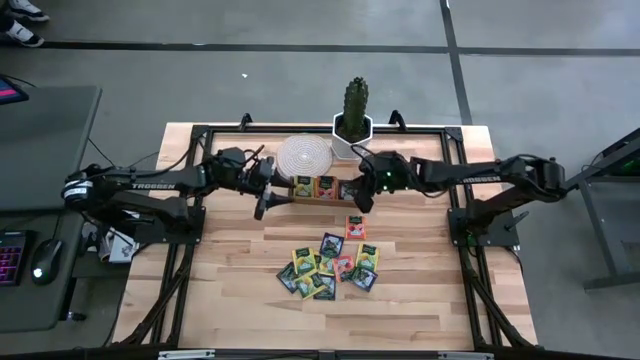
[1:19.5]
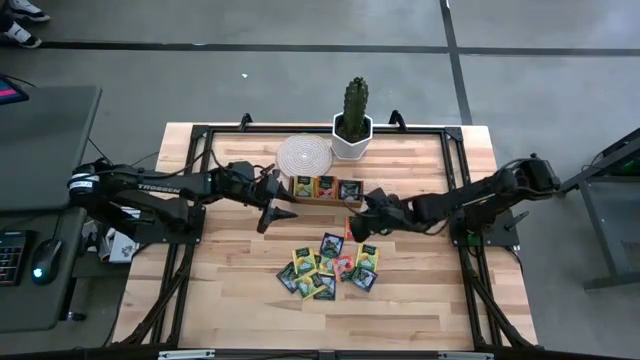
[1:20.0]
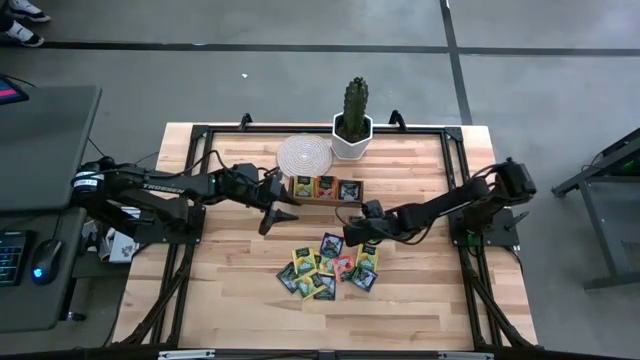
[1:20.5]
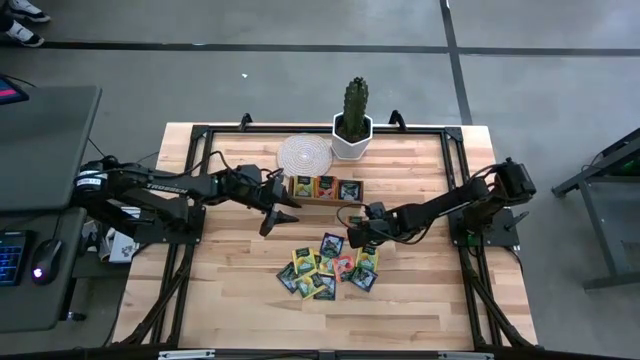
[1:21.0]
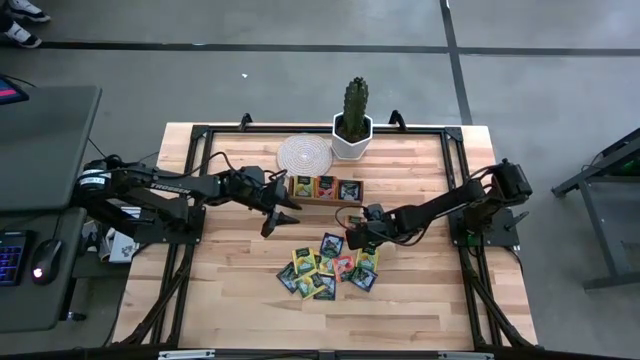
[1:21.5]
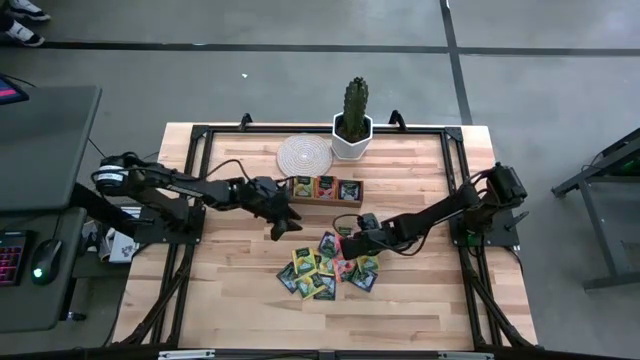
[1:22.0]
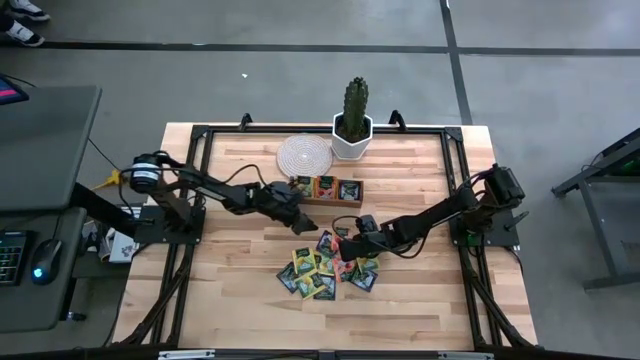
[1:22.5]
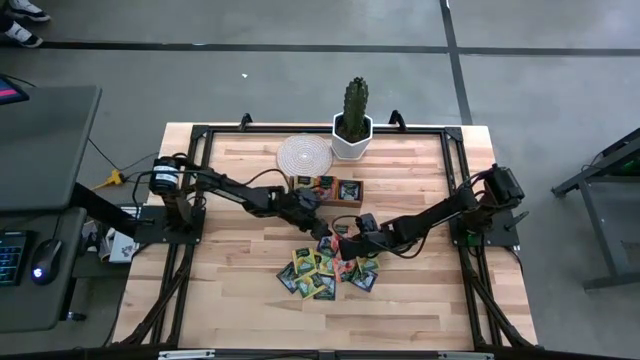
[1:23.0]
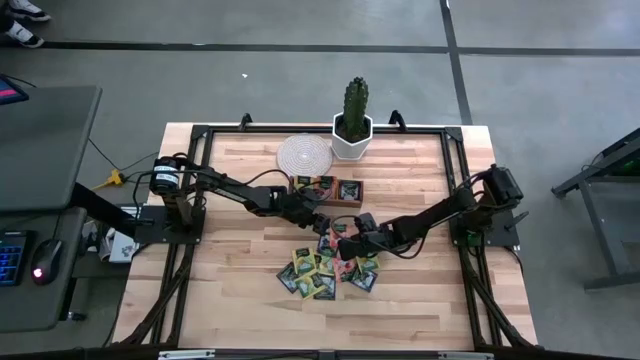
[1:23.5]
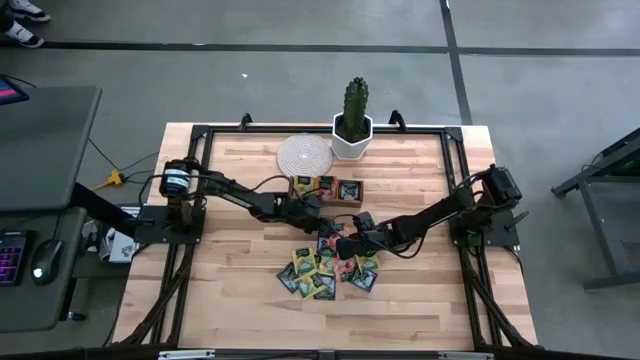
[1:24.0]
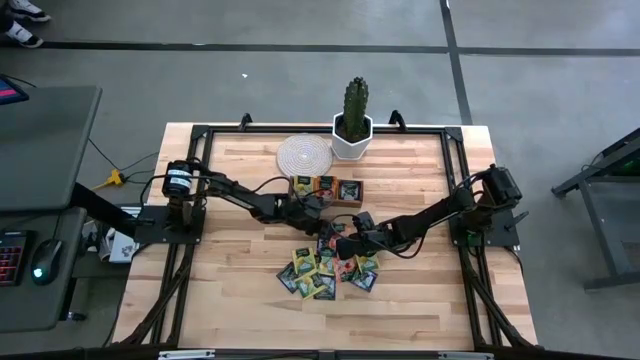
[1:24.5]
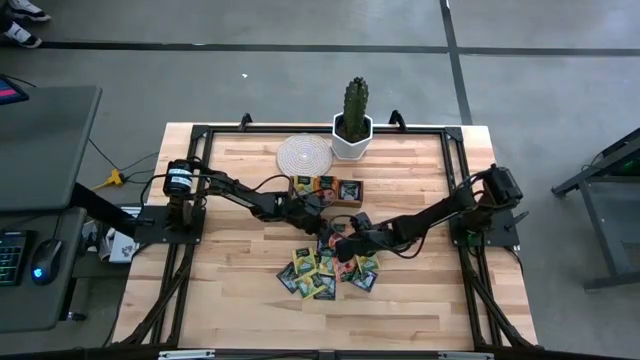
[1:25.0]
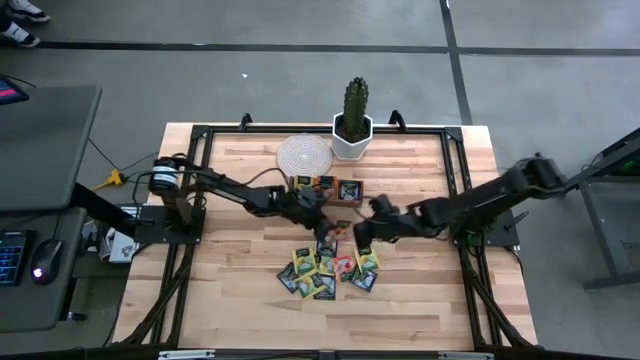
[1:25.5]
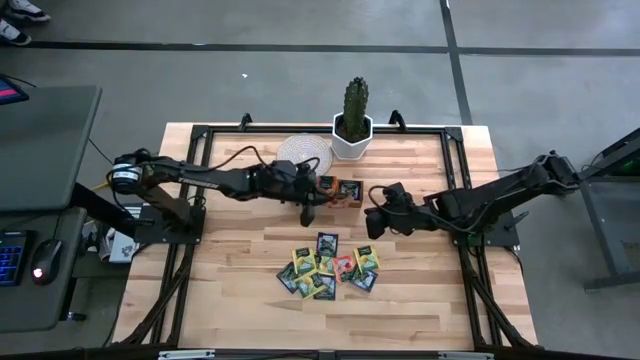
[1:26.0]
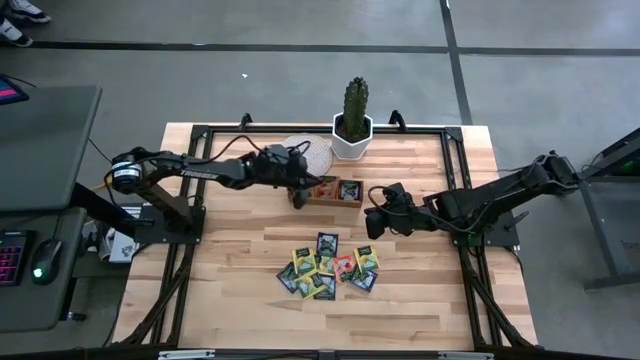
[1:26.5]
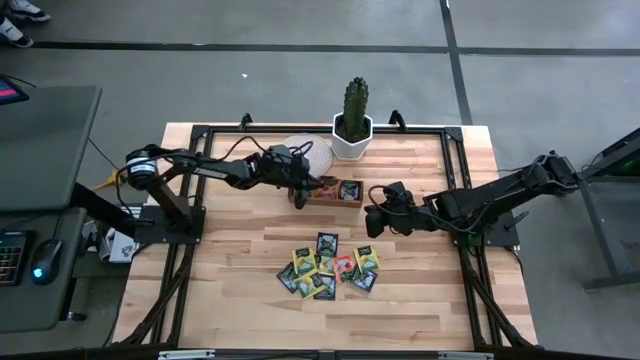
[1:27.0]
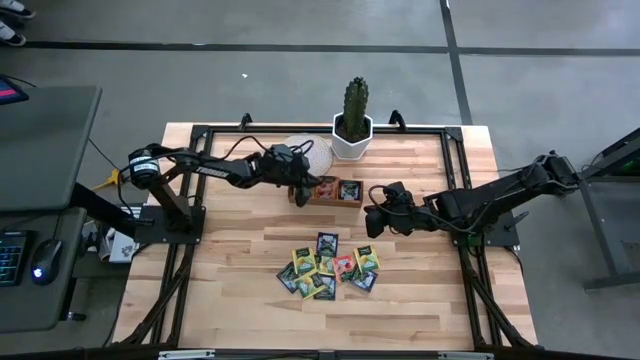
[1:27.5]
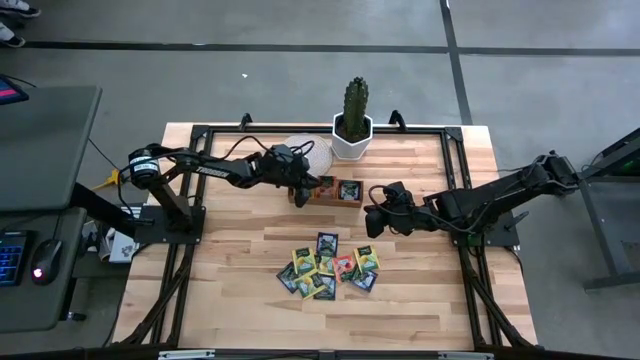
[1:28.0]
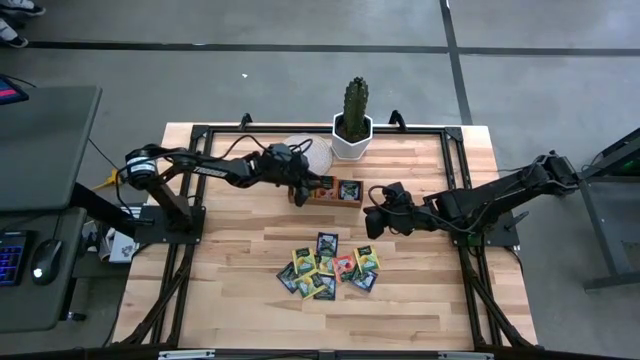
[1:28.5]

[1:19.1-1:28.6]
Task: Pick & Place Tea
Put the orange tea bag into the middle section of the wooden organizer

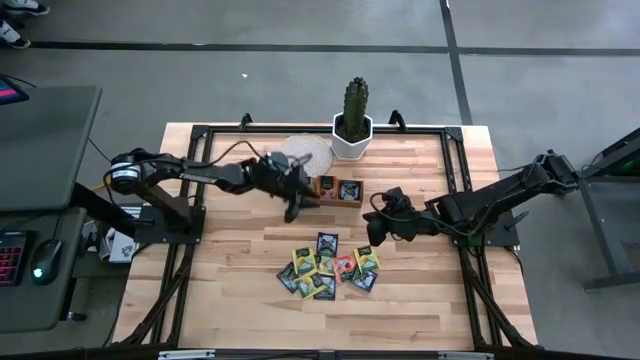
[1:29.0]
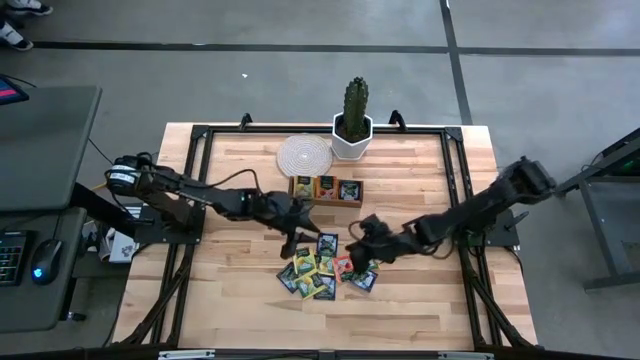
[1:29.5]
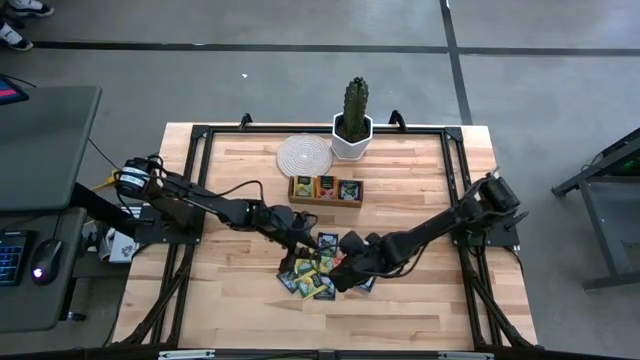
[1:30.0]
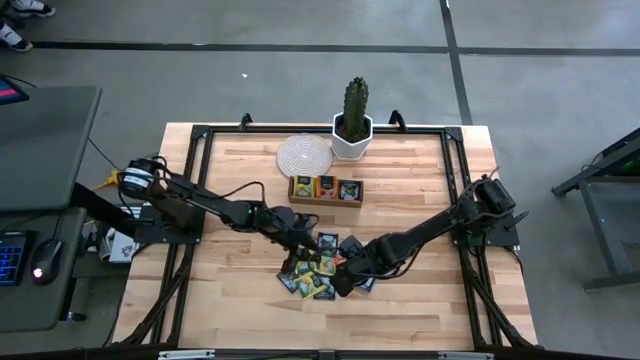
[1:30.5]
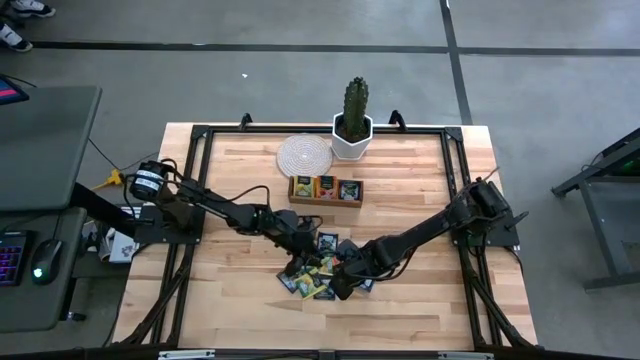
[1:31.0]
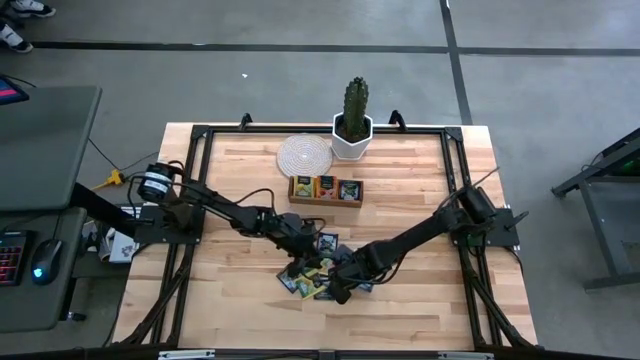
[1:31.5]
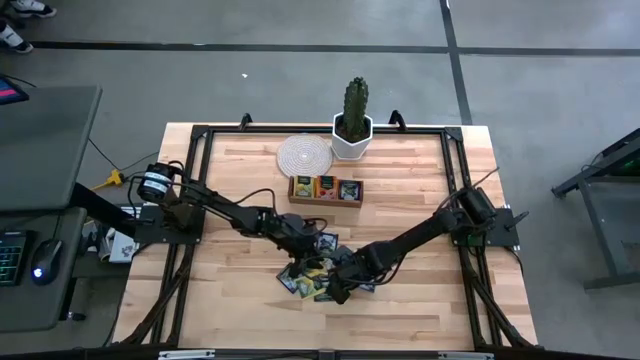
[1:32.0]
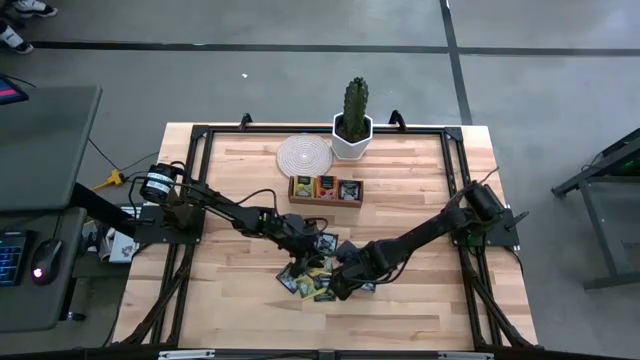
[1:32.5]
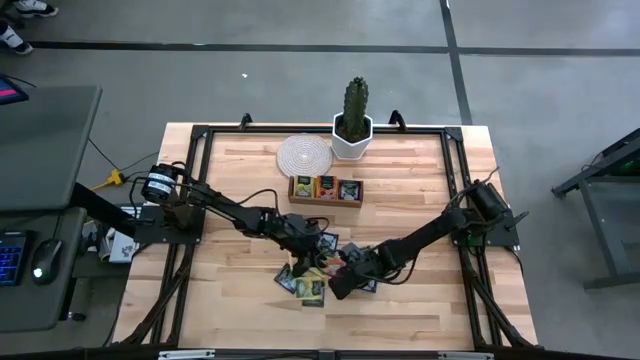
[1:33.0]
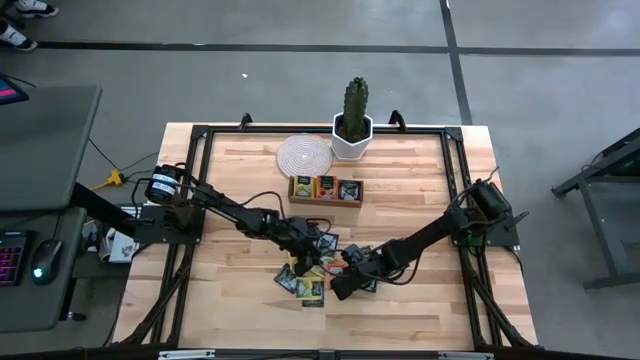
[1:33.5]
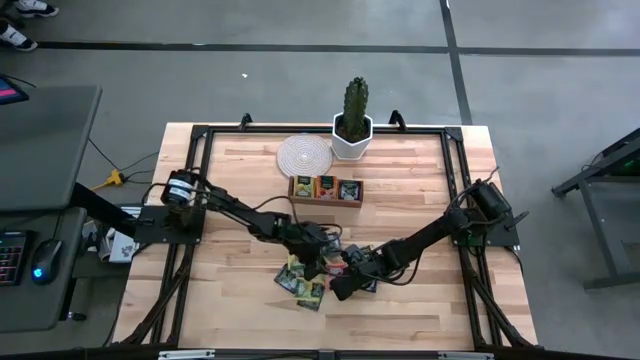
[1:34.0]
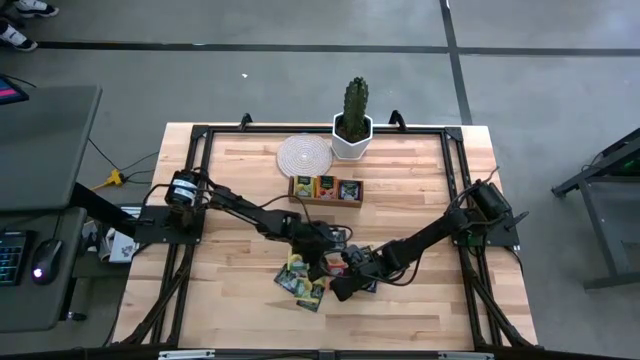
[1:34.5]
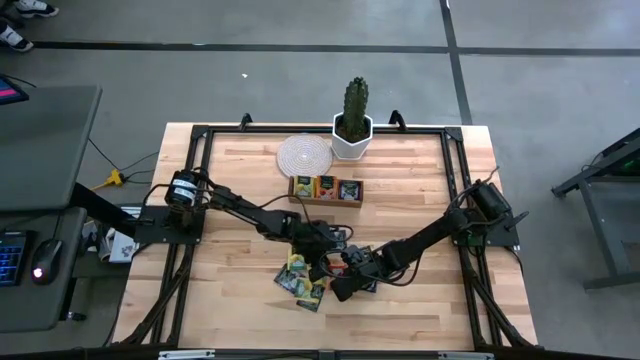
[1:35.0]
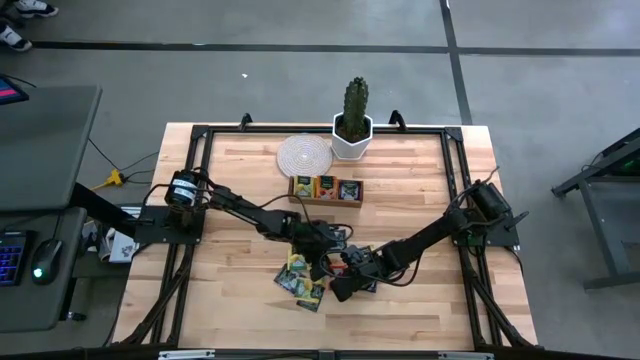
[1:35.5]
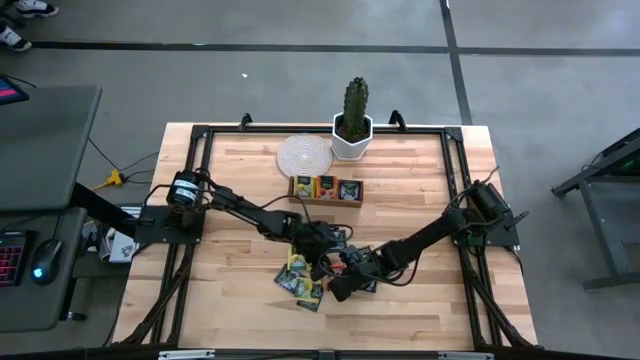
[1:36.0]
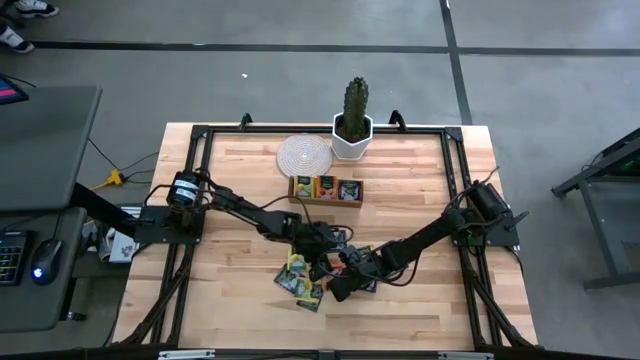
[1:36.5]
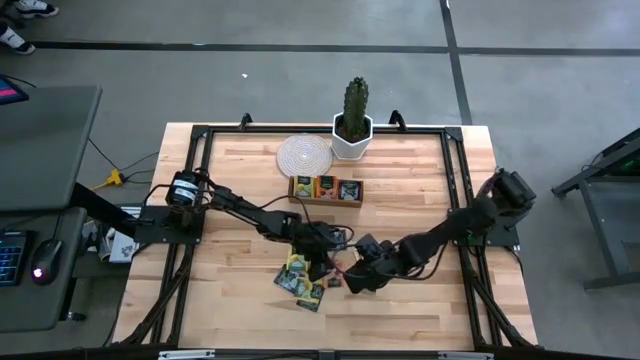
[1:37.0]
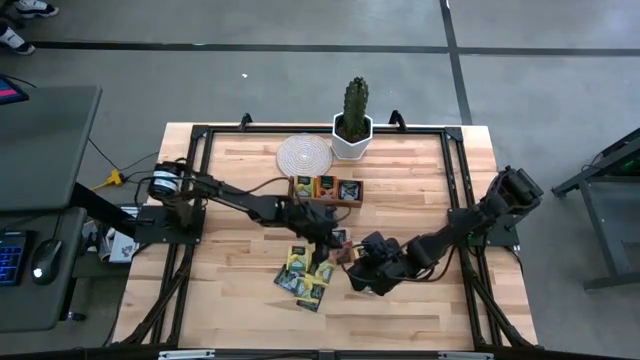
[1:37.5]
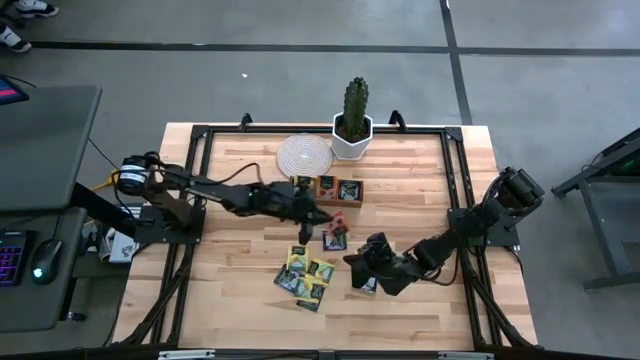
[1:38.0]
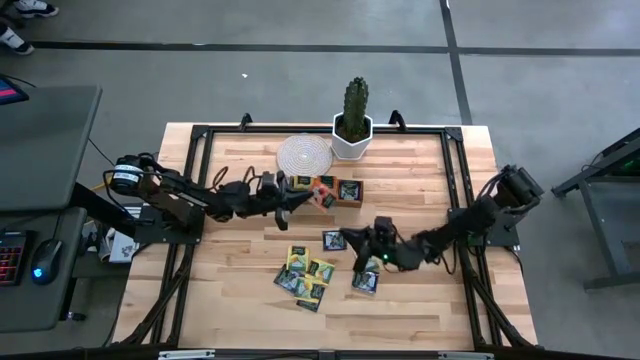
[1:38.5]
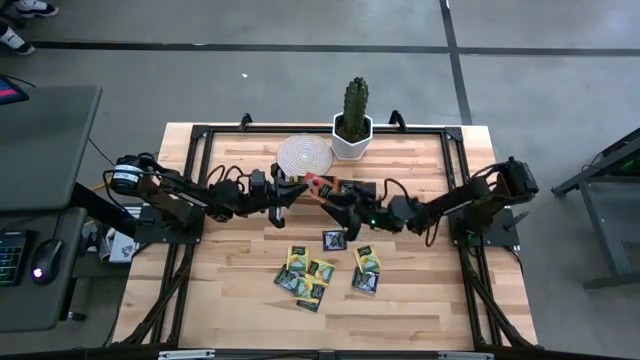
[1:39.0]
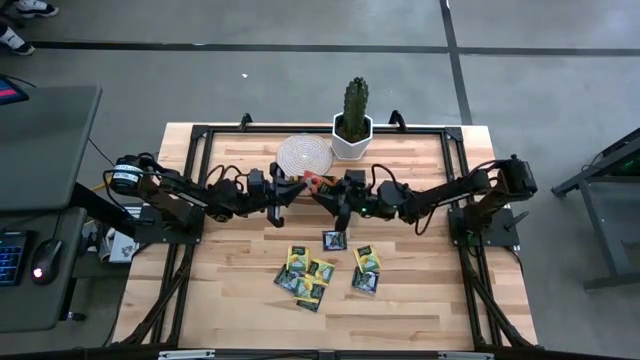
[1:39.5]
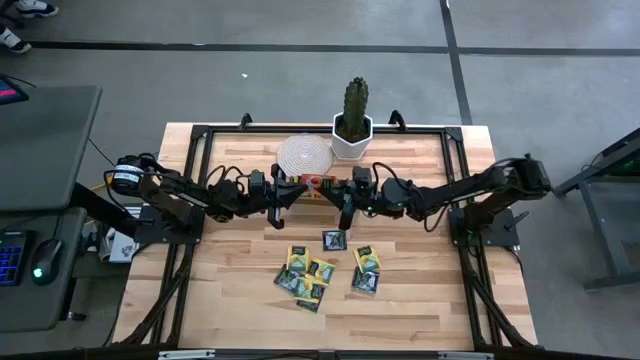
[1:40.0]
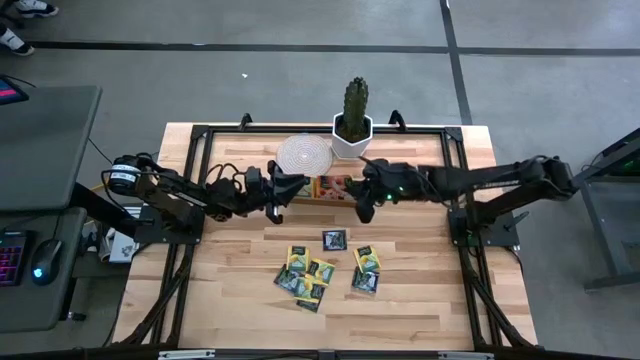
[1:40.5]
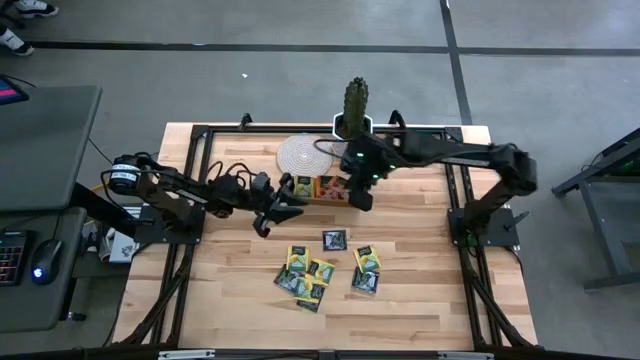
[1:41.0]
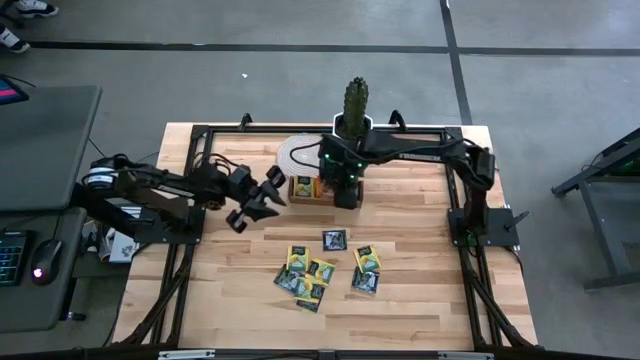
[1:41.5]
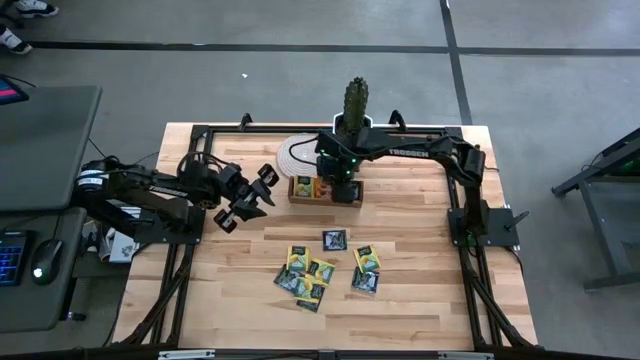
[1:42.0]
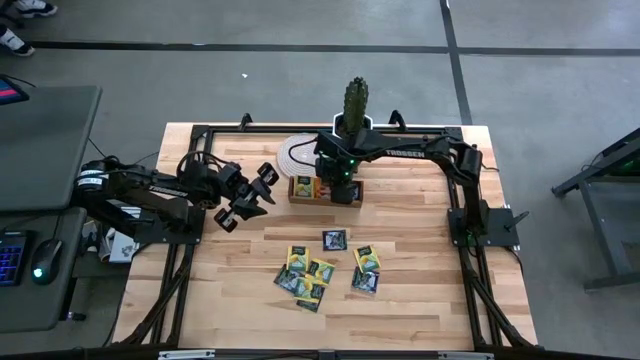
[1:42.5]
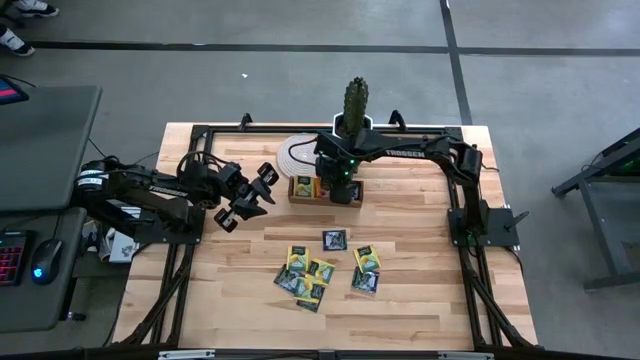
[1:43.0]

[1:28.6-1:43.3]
Put the orange tea bag into the middle section of the wooden organizer
